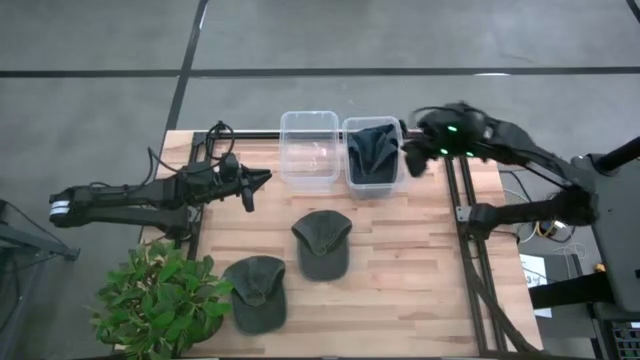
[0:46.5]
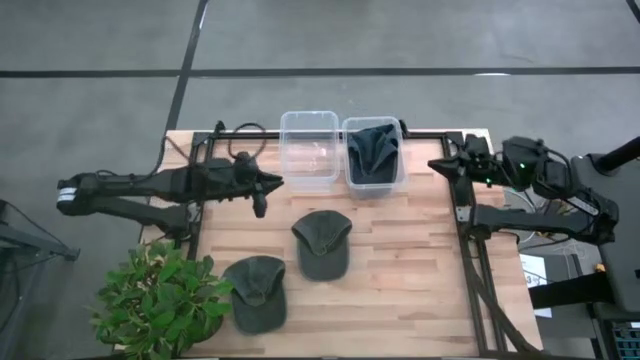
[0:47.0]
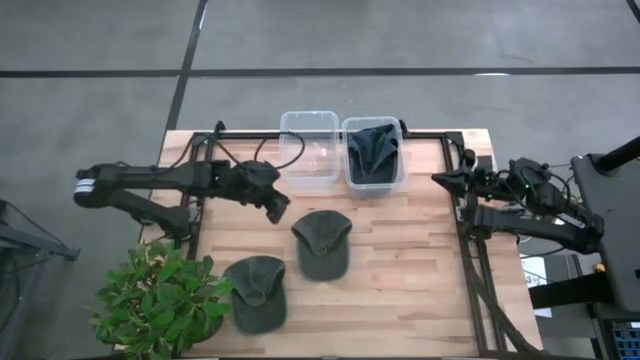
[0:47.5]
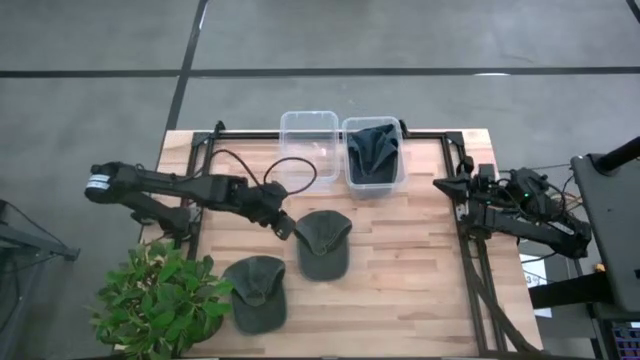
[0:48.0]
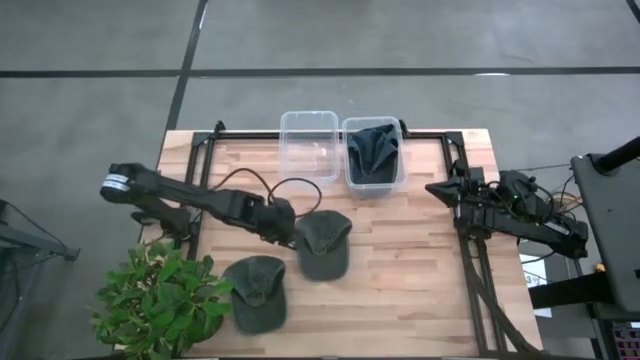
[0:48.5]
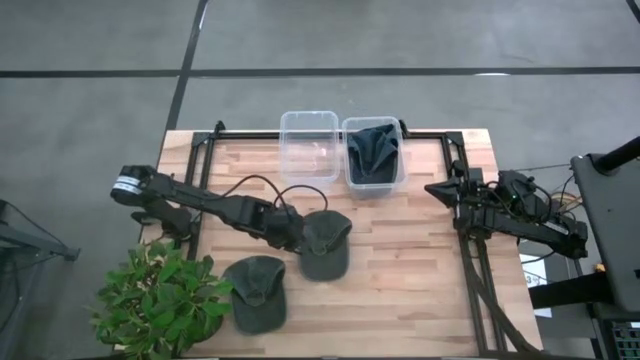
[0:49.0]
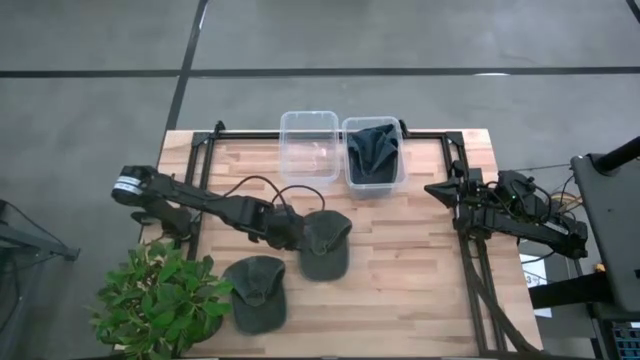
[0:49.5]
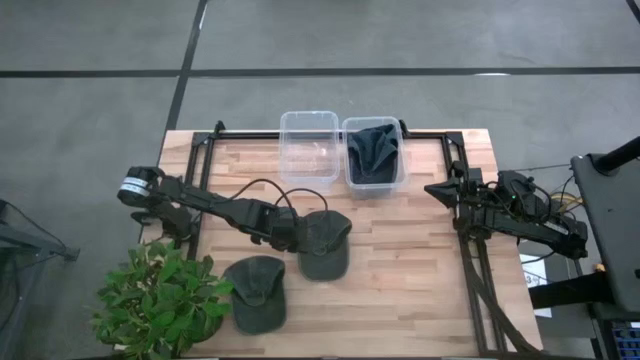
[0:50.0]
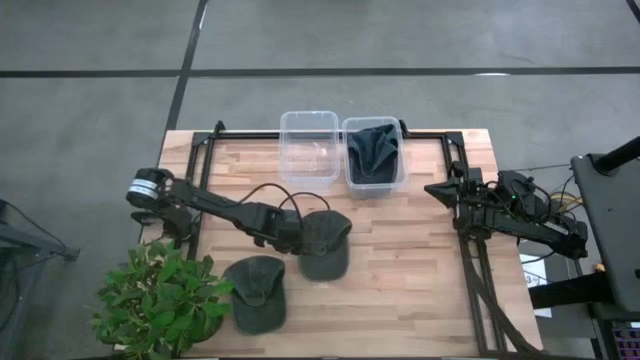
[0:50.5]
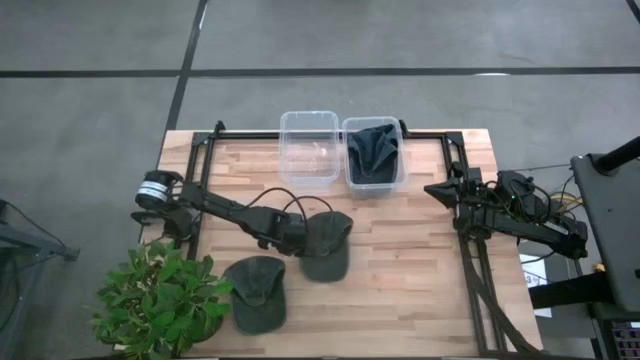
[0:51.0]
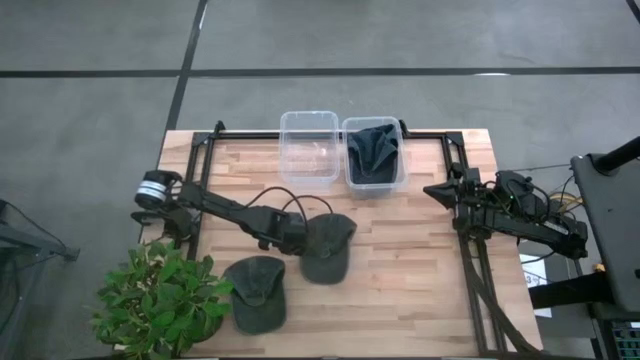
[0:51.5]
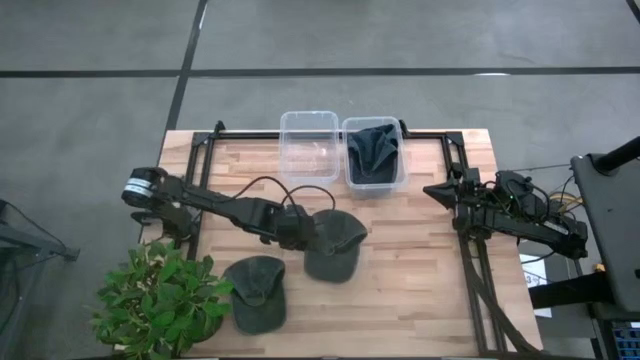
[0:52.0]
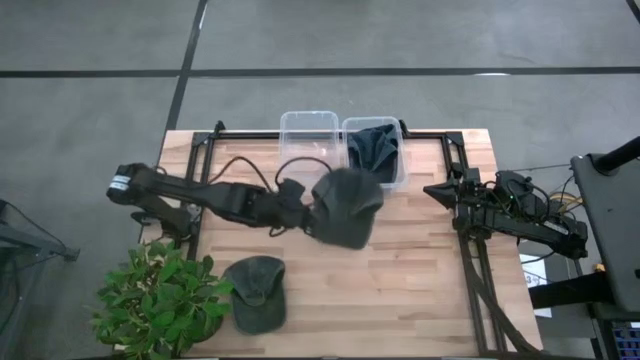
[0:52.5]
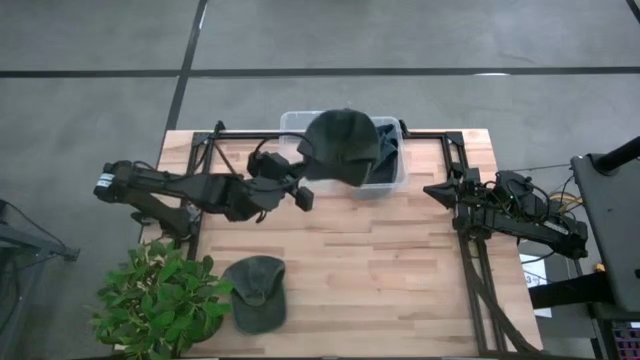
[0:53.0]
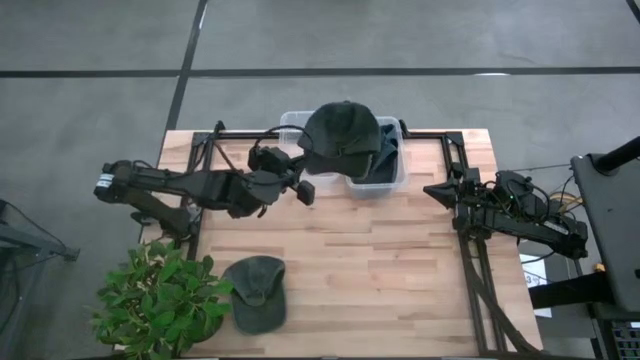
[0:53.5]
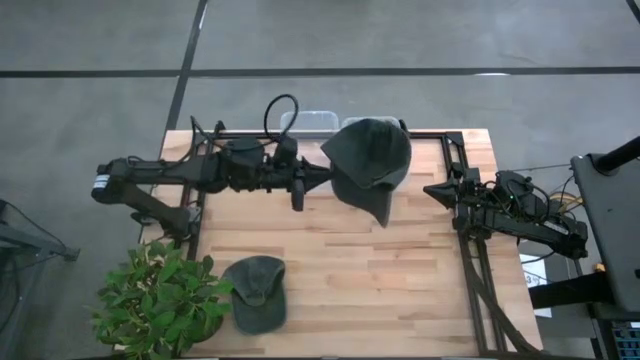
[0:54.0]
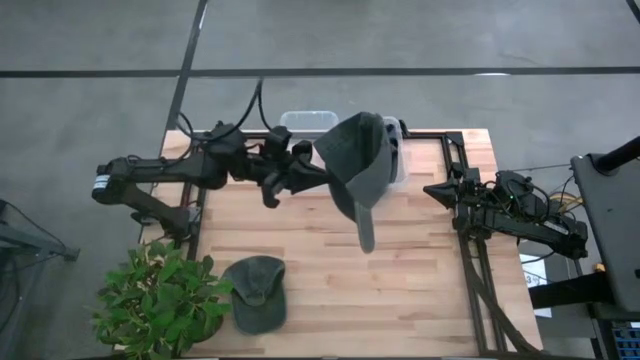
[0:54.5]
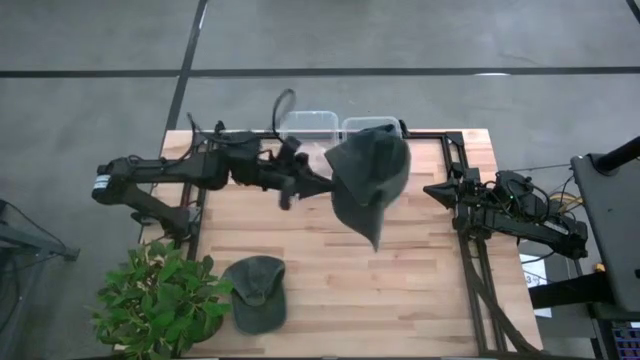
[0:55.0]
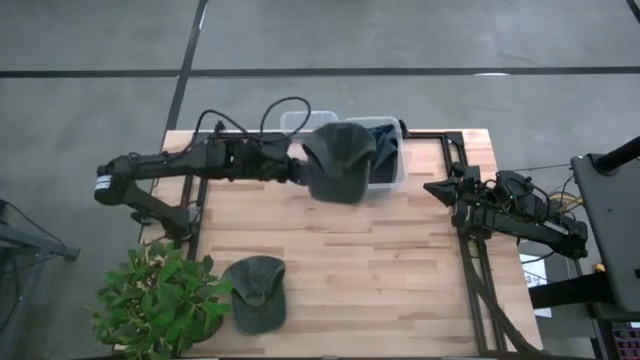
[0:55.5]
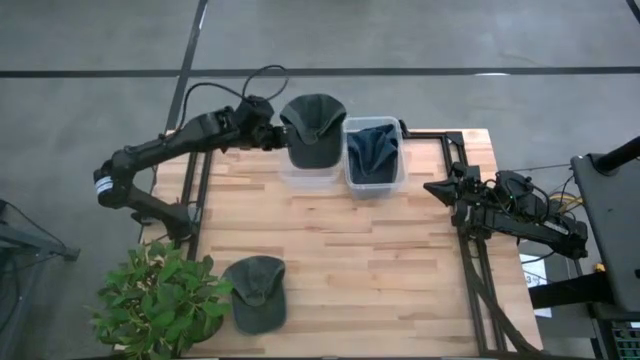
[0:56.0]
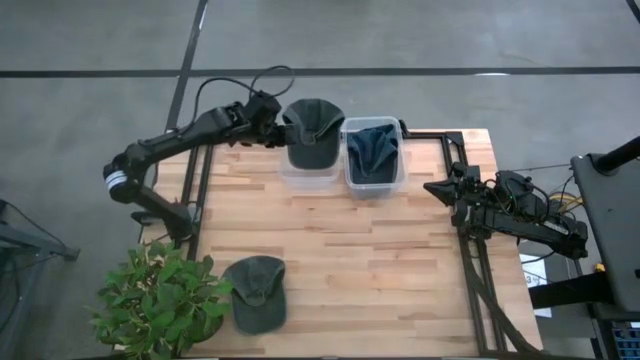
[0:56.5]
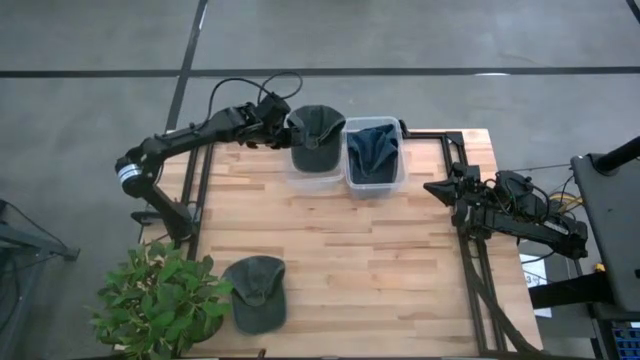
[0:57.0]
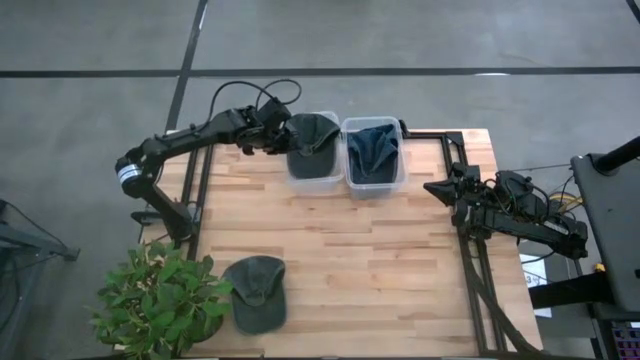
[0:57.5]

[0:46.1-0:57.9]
Task: Pick & Place hat
Put the right black cap into the left transparent bin

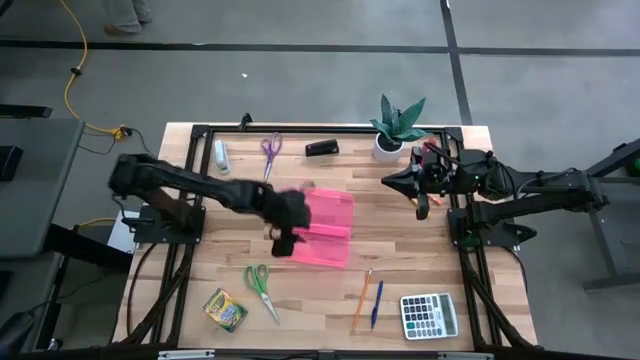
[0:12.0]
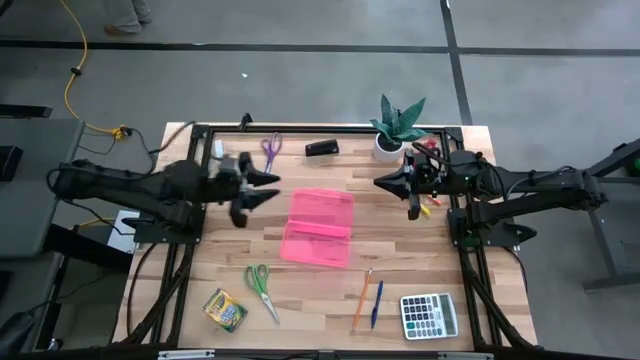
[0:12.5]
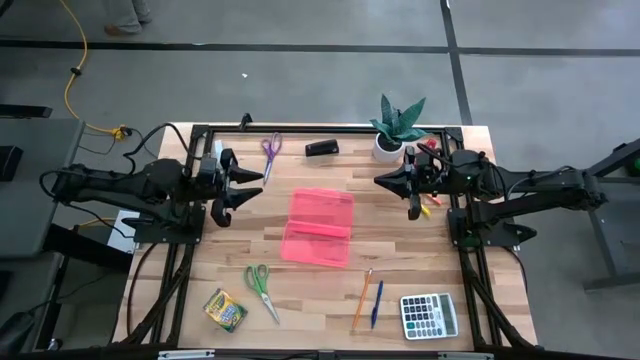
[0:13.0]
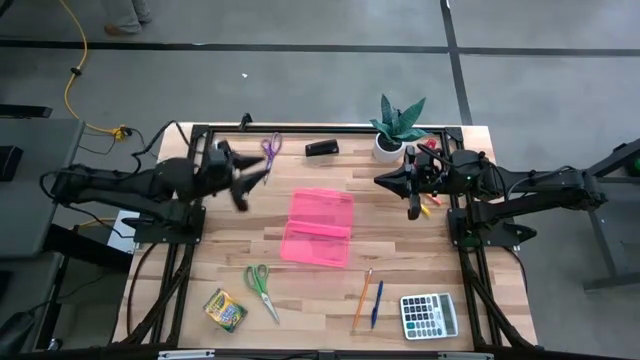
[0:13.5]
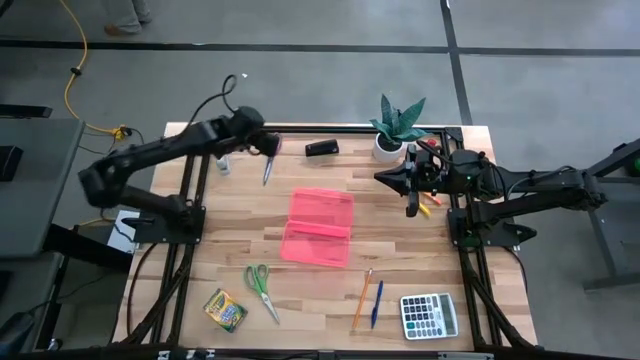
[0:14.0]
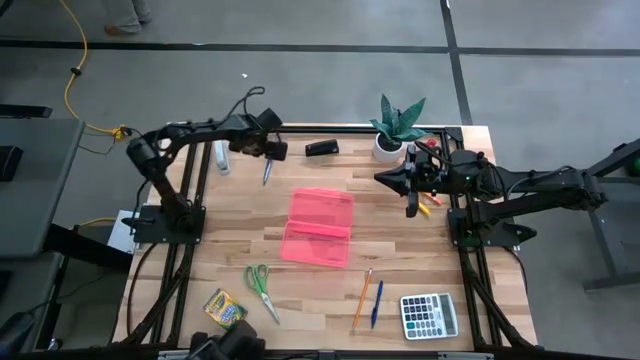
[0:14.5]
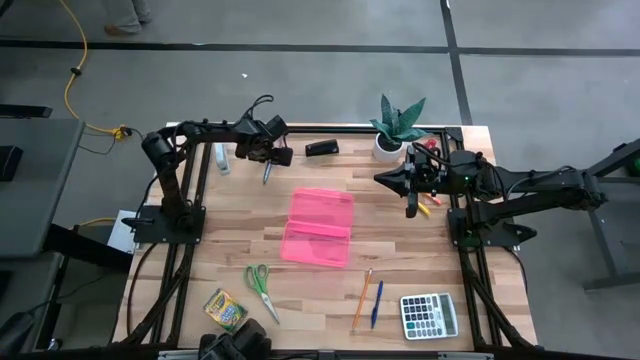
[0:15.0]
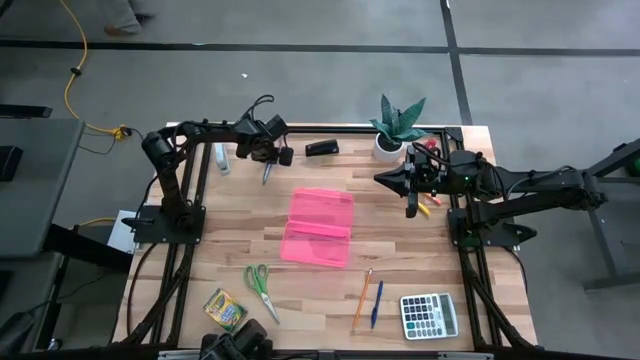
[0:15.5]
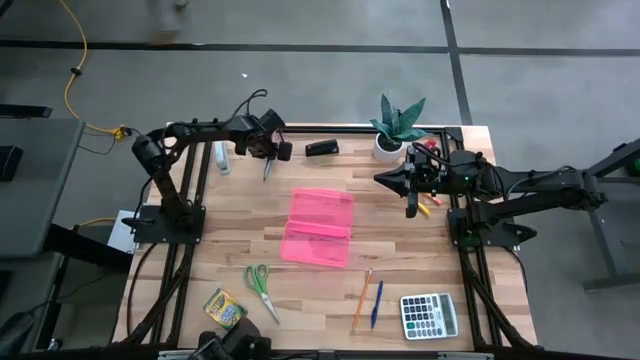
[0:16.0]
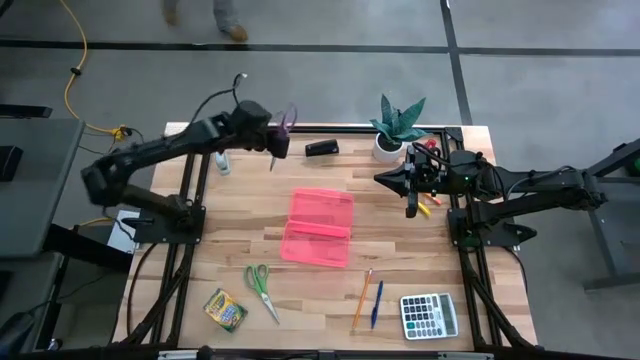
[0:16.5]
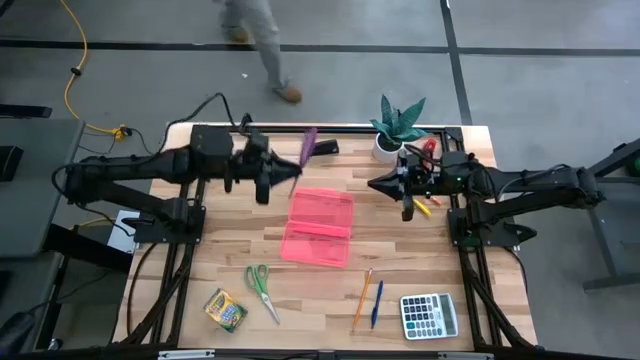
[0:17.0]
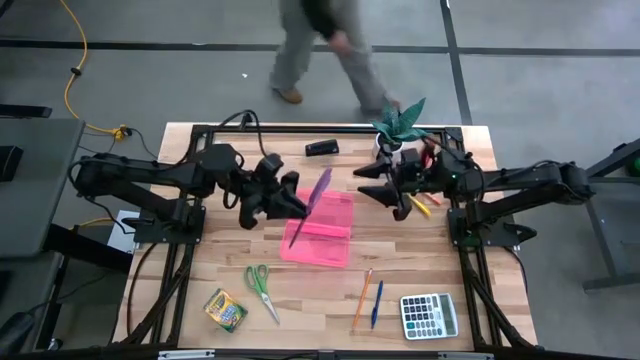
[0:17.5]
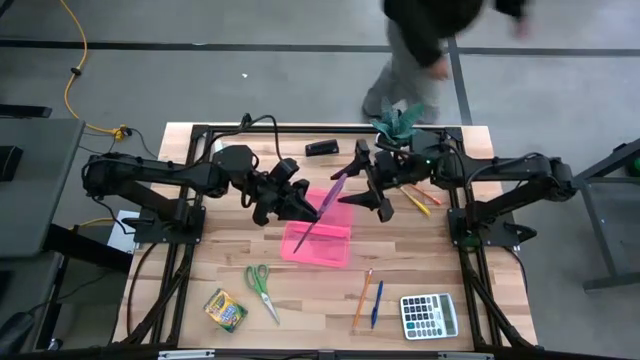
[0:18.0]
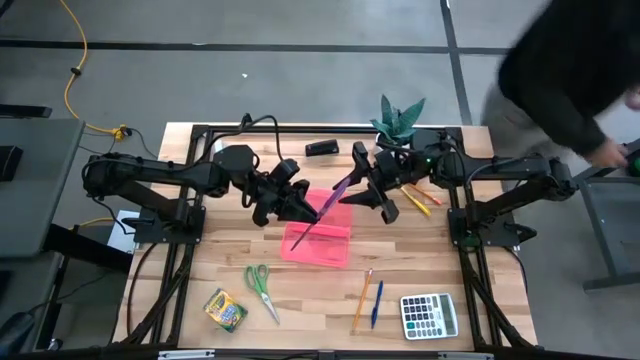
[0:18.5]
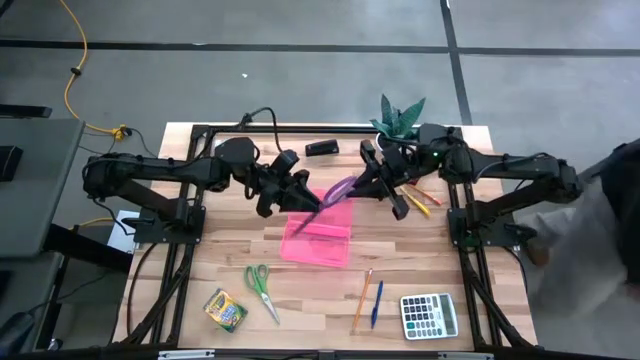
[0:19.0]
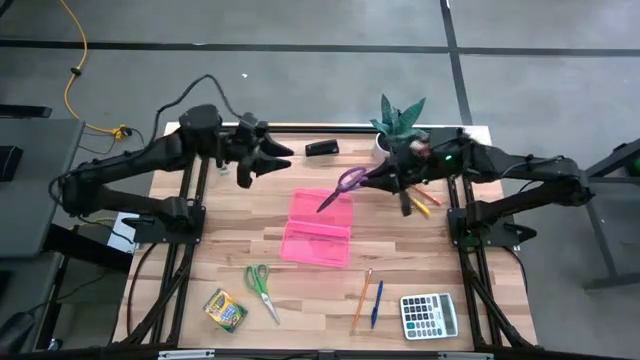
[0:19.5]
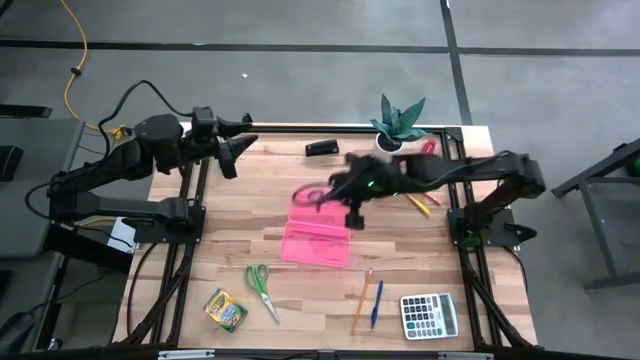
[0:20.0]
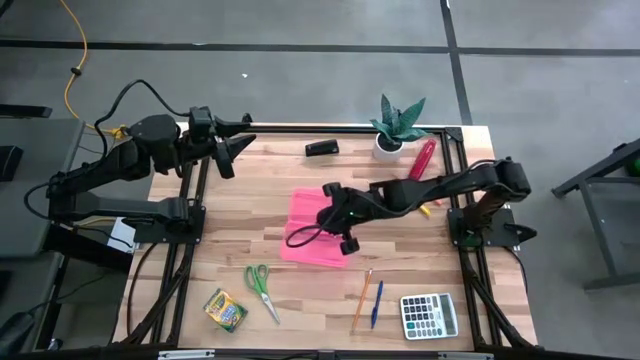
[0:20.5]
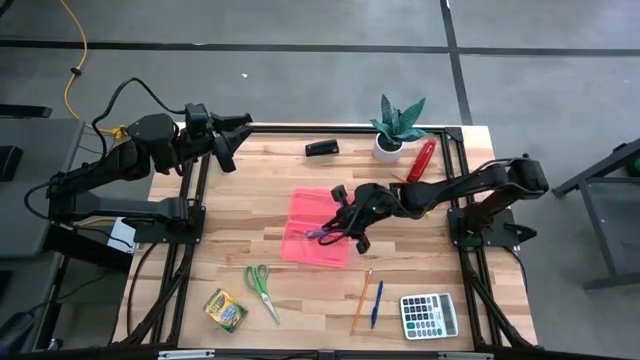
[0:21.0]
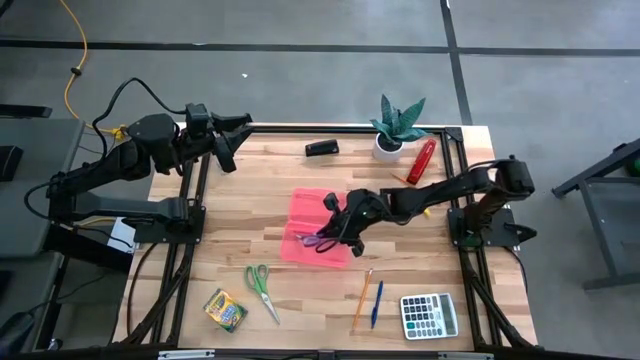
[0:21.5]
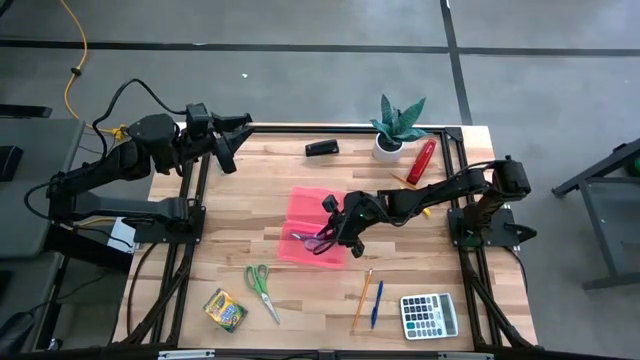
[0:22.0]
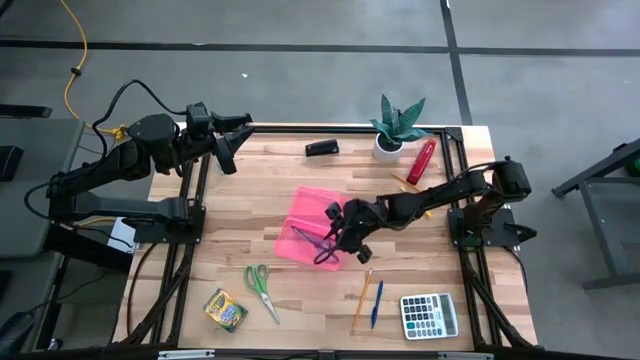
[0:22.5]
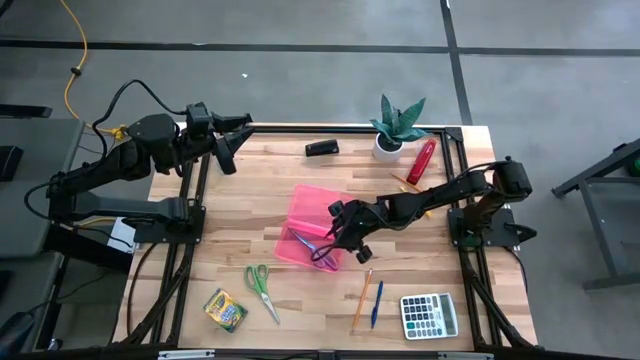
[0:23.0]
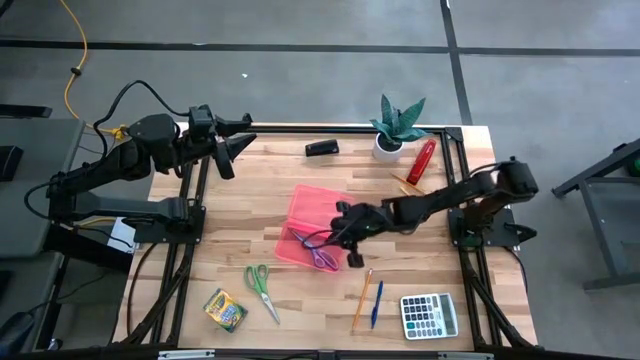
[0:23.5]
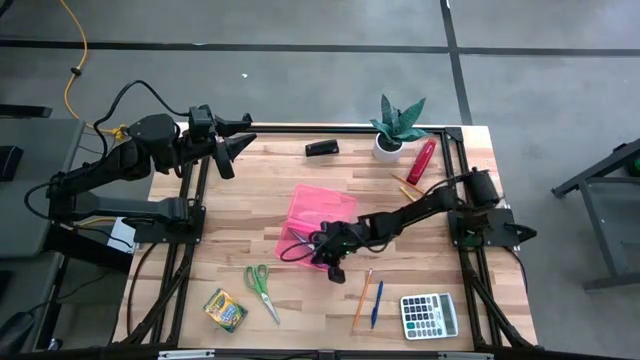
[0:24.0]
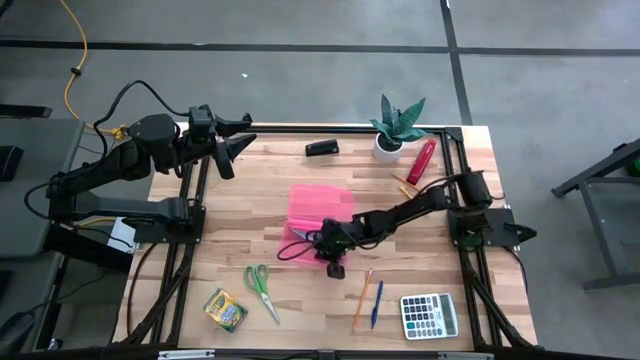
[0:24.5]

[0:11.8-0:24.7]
Task: Pick & place school supplies into a supply box
Put the purple scissors into the pink supply box
